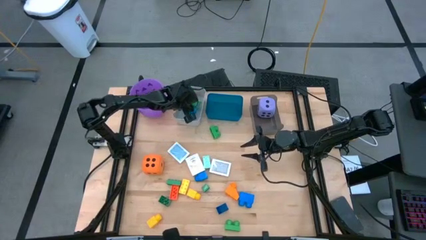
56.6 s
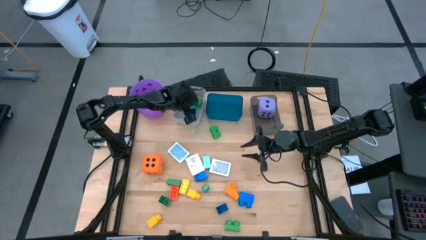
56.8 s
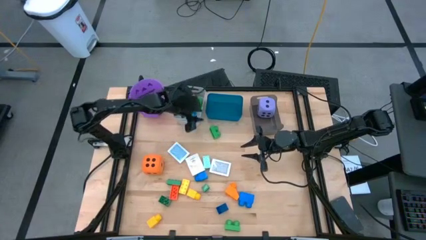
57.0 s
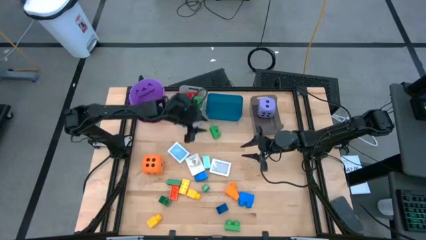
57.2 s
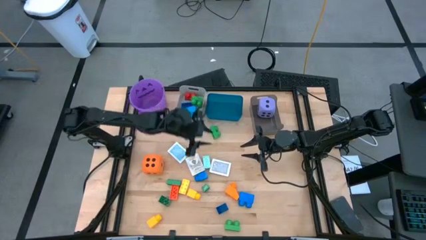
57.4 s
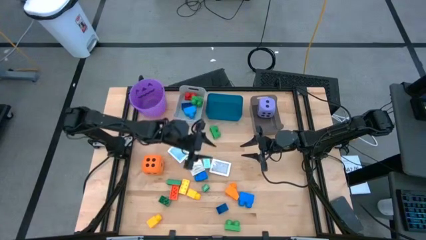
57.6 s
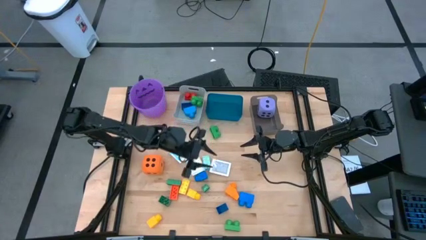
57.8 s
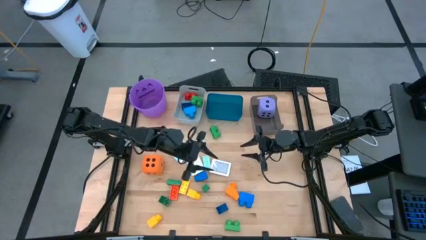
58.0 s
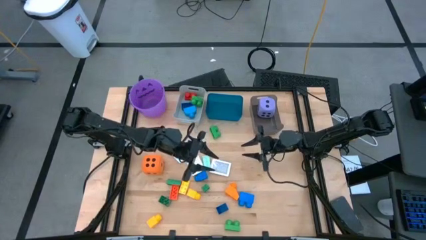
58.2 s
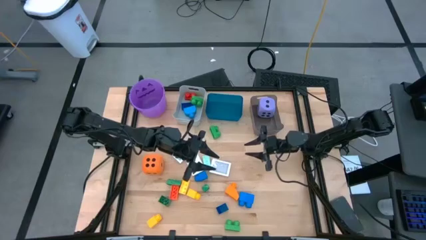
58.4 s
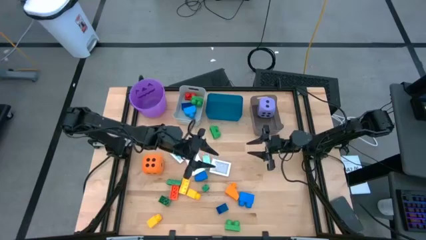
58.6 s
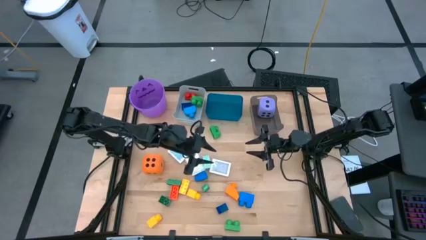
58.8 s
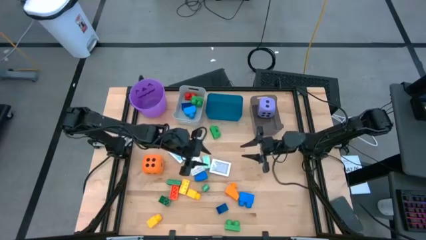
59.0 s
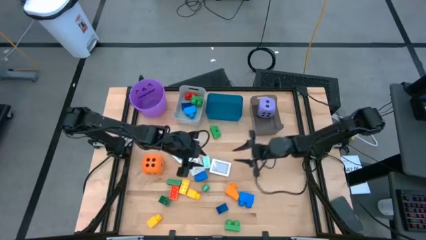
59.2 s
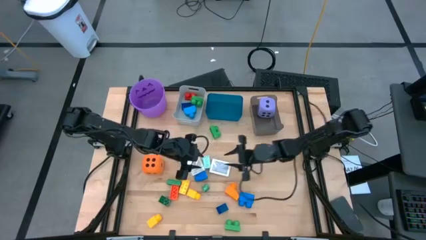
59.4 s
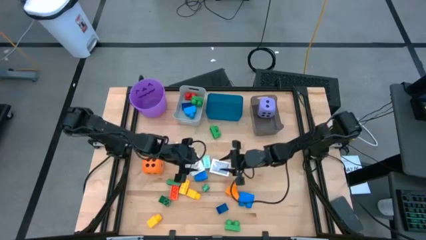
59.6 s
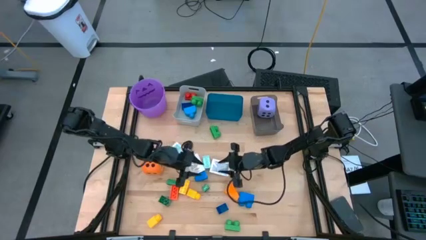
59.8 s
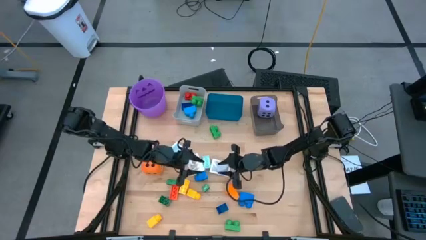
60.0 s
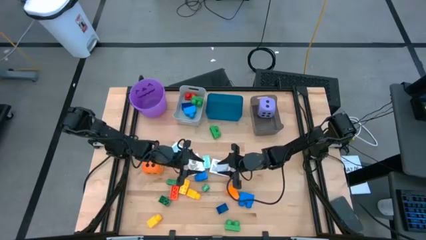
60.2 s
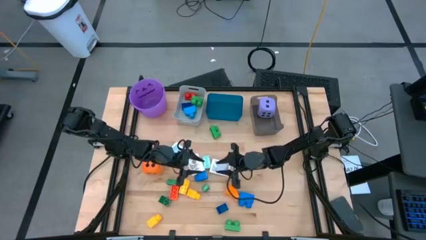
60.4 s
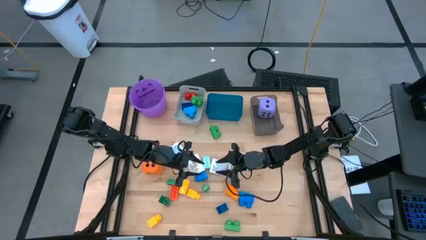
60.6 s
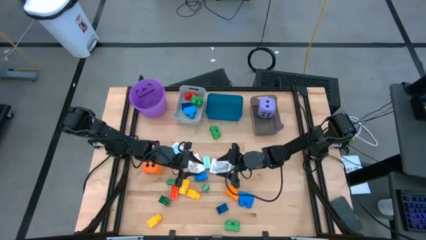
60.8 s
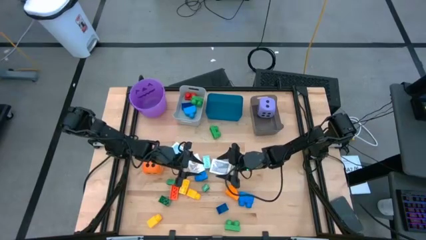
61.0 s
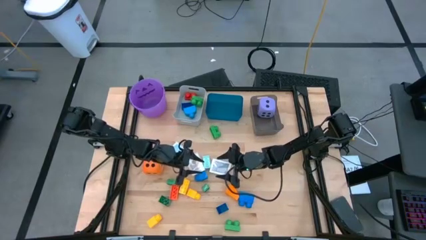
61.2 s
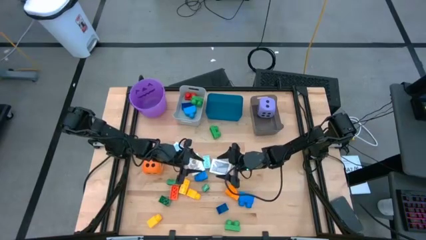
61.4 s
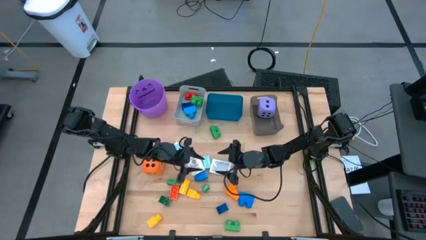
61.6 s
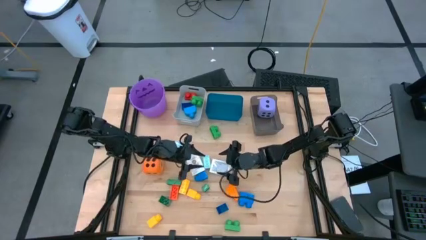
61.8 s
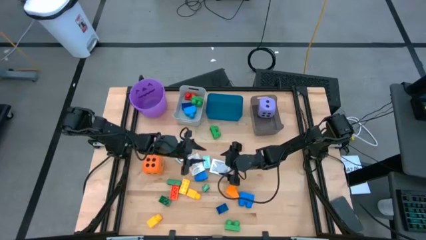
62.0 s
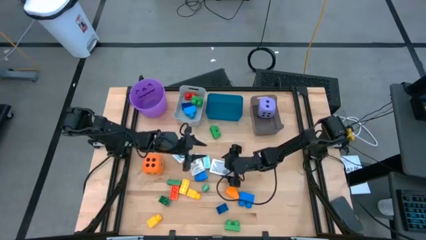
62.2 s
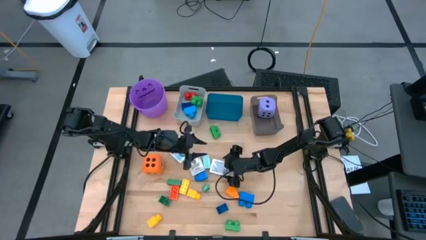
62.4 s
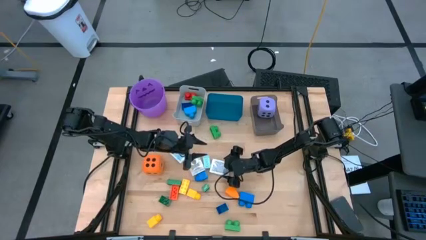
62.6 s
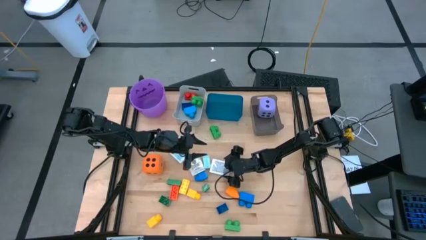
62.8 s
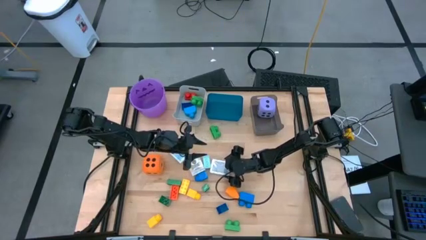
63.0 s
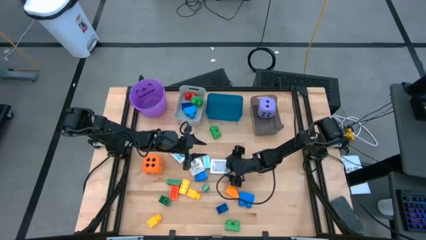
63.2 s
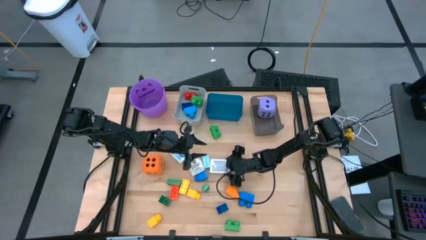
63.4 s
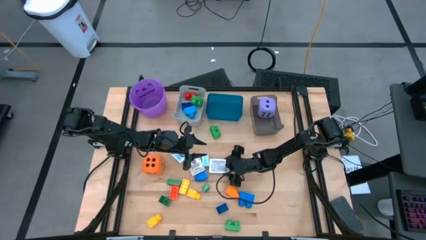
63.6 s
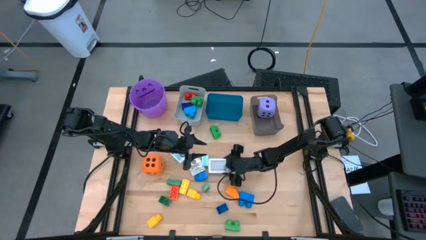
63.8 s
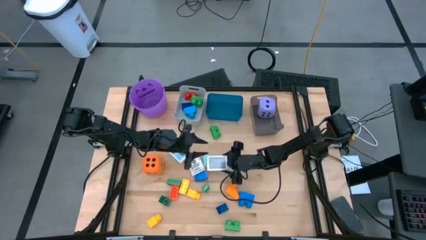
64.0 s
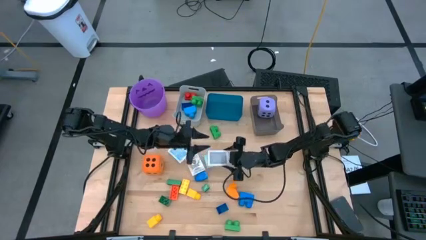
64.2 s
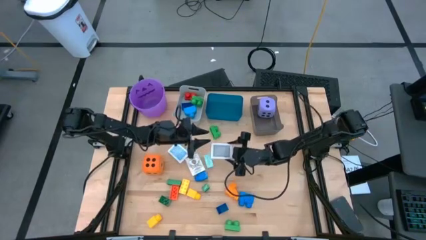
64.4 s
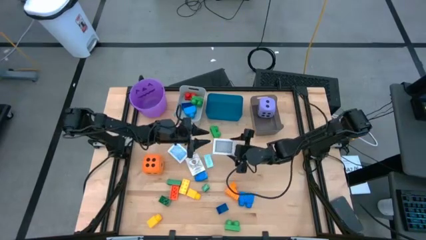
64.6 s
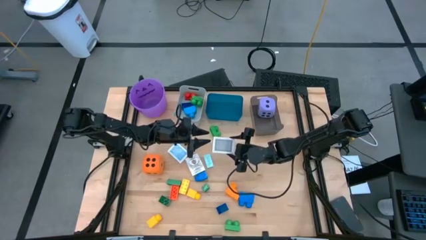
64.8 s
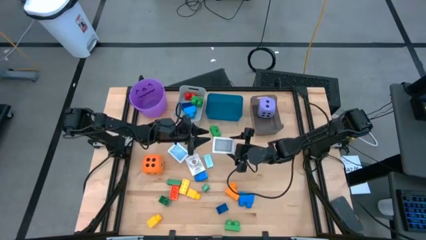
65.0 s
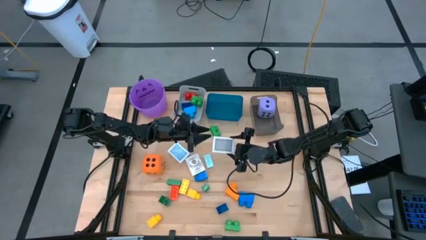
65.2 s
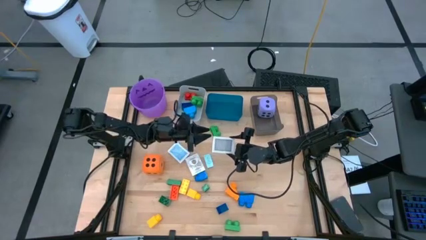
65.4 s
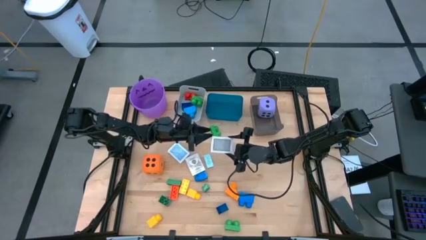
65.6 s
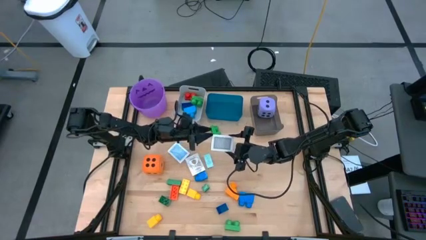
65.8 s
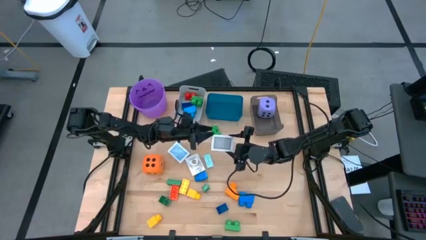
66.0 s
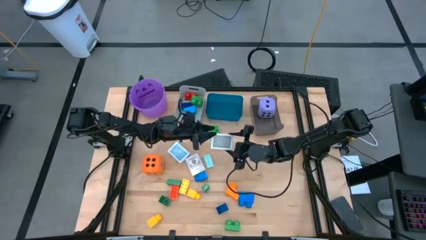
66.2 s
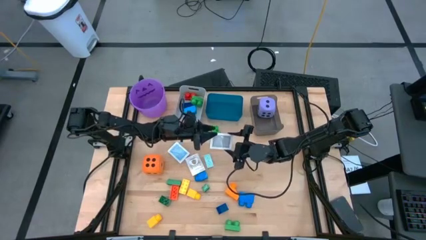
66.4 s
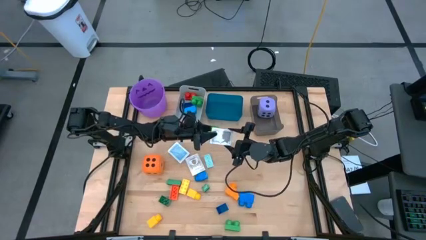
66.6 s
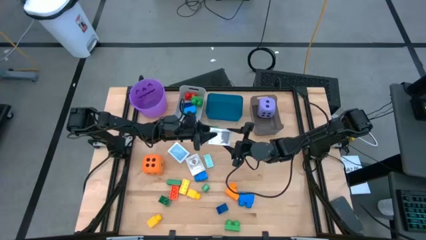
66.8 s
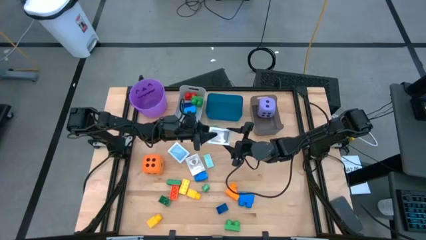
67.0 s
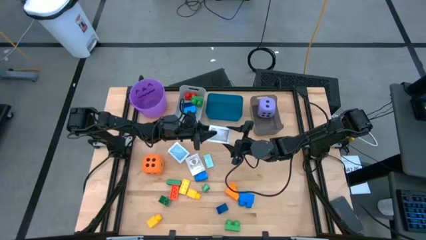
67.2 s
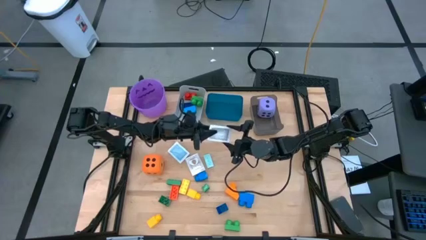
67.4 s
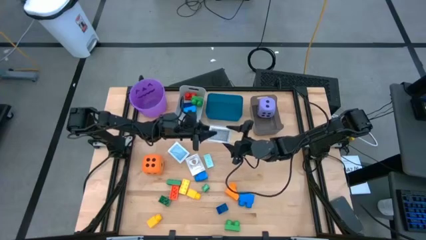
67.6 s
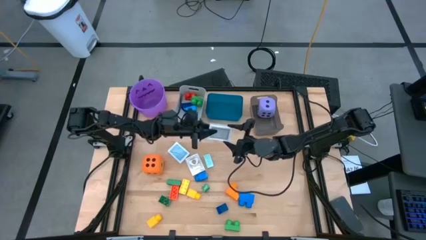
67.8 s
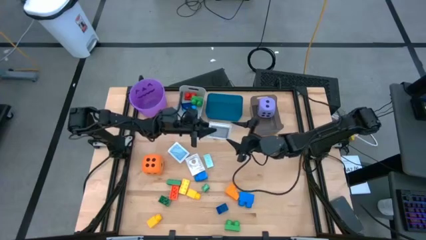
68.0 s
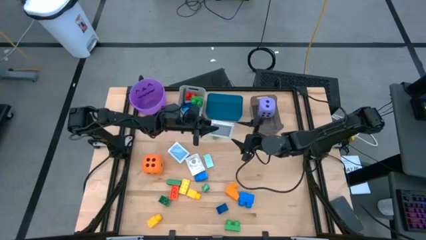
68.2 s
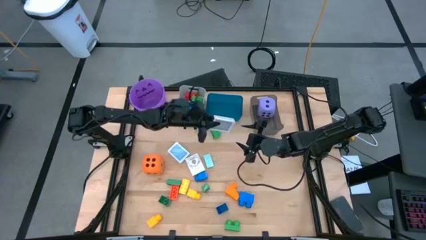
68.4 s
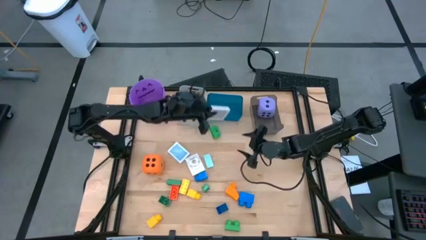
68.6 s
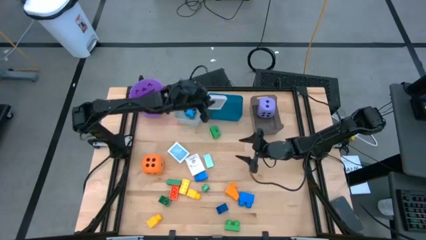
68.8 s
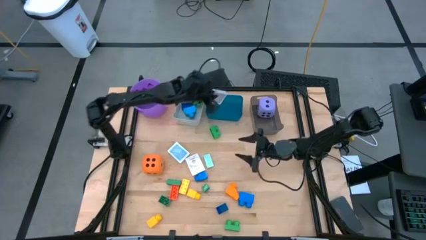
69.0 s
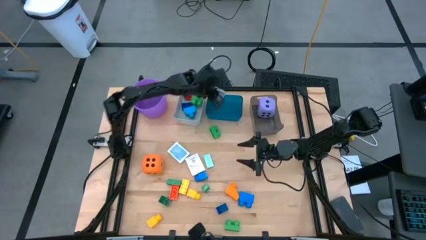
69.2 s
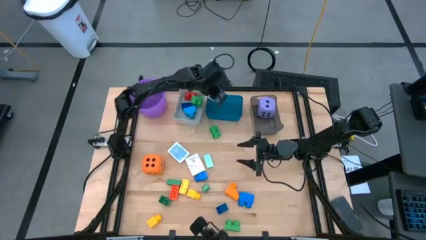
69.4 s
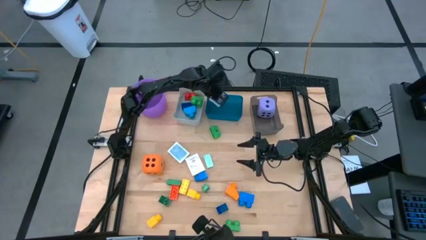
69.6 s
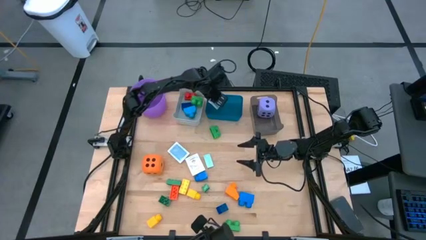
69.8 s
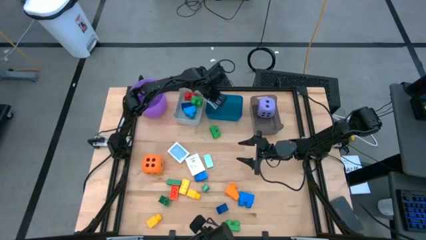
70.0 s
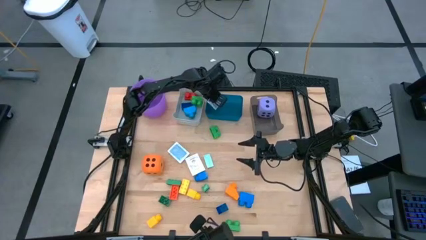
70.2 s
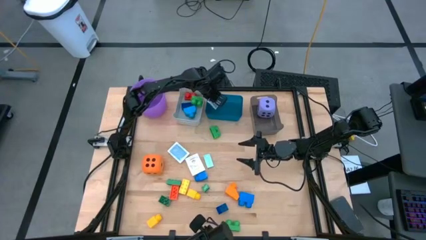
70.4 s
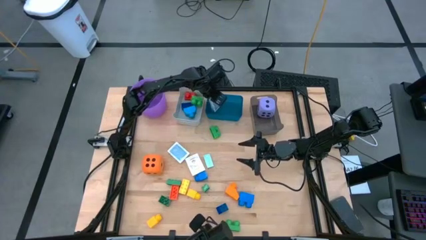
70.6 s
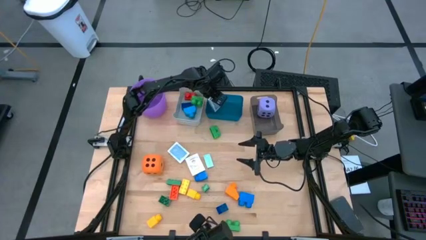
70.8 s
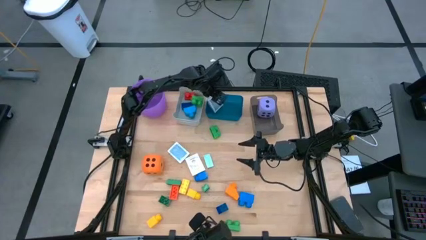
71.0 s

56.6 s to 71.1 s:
Task: Pick & Place Toys
Put the white and black deck of cards into the blue bin

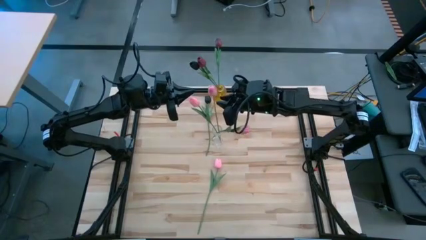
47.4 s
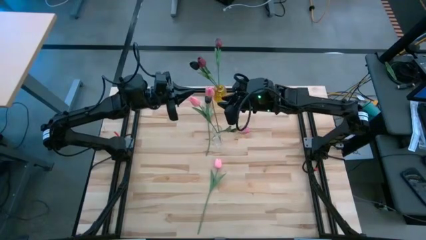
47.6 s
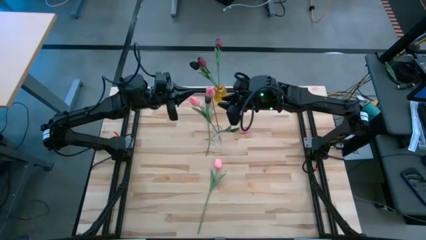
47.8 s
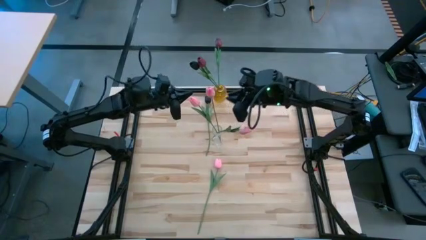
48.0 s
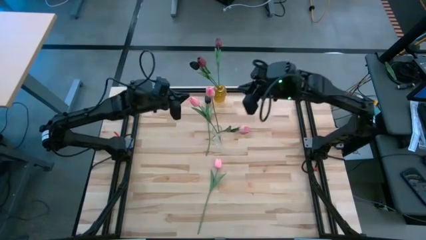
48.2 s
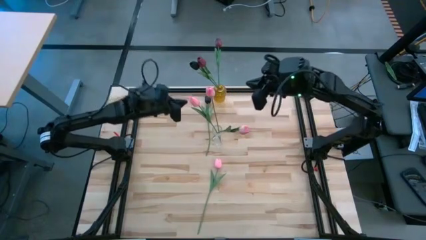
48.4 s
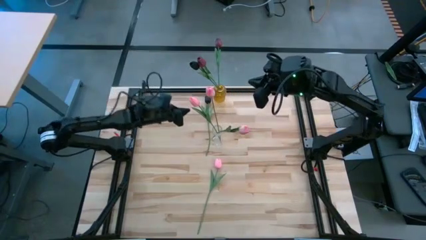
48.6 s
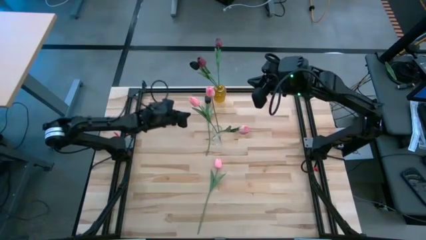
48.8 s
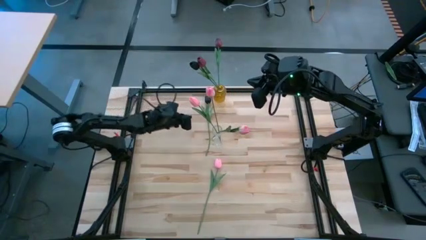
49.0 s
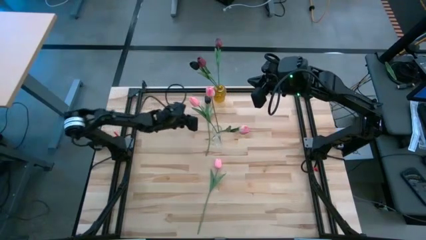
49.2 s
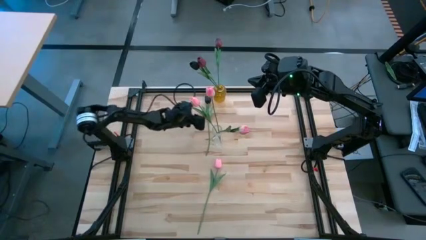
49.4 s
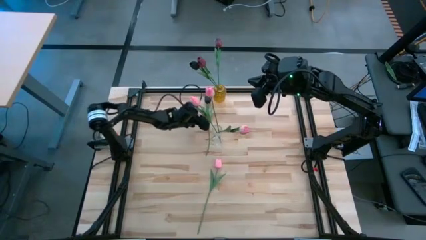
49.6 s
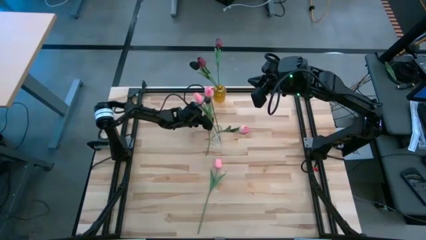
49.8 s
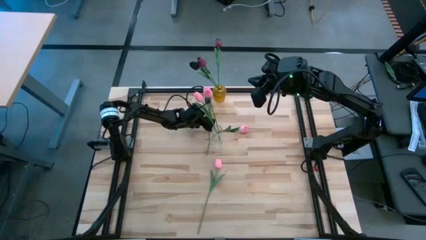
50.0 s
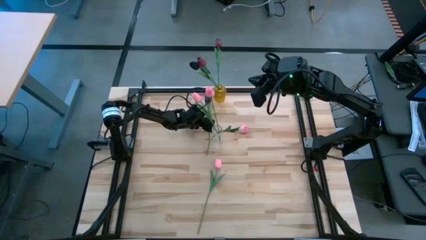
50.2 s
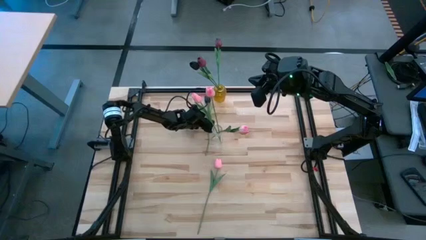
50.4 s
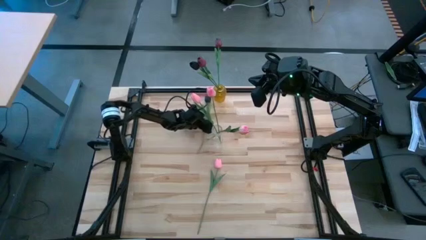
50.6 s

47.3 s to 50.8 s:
Task: Sort flowers into vase by color
Put the black flower into the yellow vase
